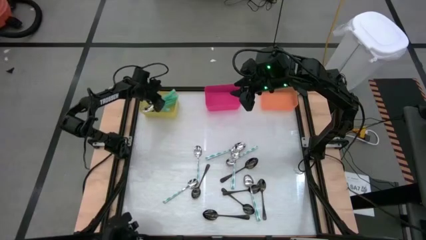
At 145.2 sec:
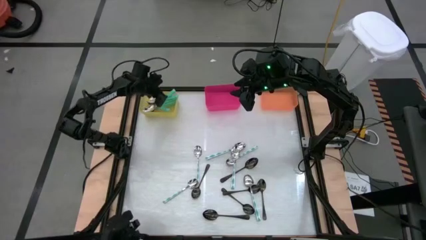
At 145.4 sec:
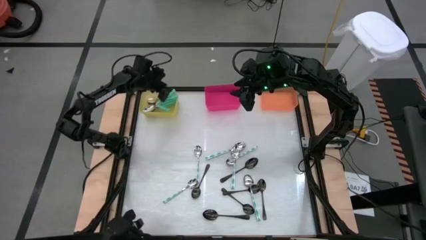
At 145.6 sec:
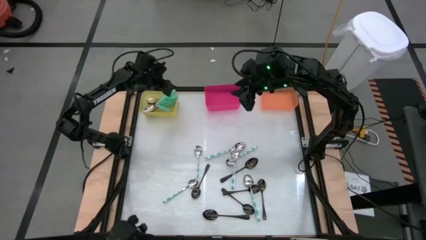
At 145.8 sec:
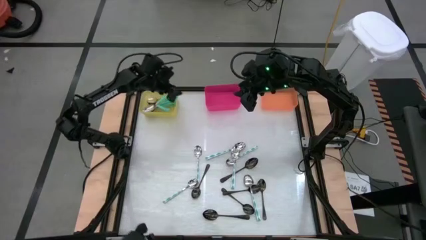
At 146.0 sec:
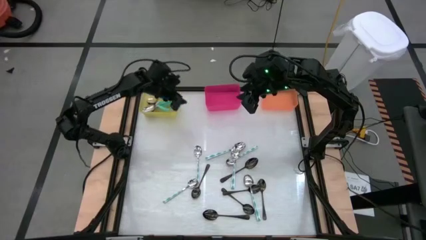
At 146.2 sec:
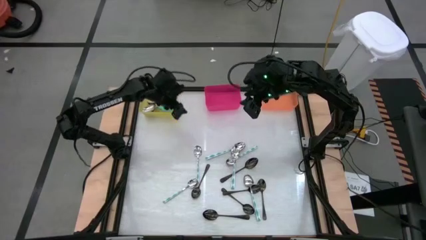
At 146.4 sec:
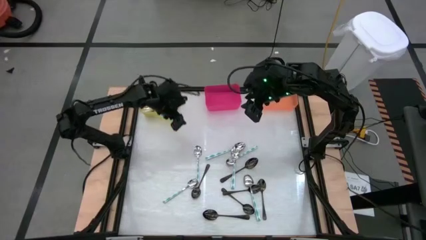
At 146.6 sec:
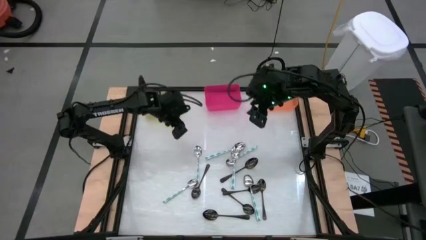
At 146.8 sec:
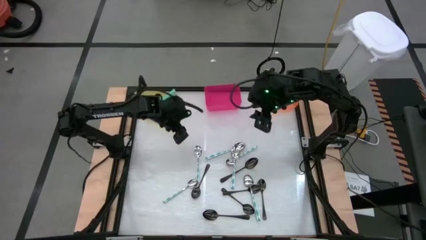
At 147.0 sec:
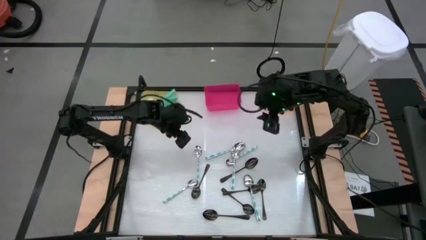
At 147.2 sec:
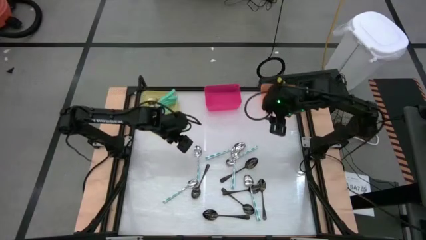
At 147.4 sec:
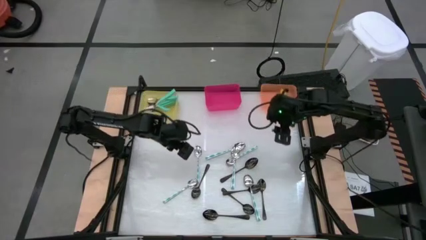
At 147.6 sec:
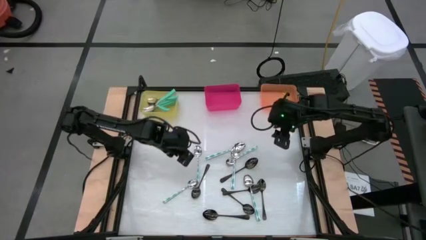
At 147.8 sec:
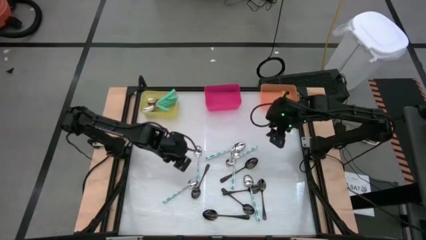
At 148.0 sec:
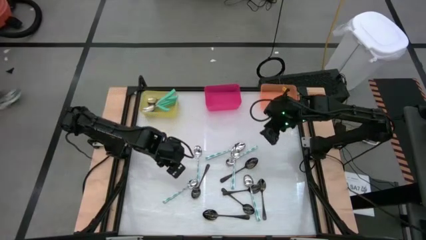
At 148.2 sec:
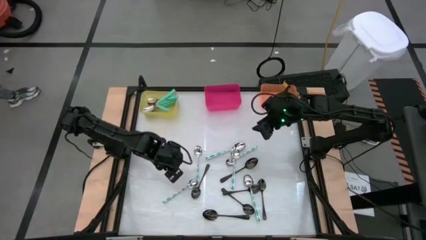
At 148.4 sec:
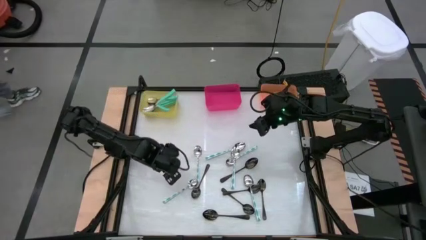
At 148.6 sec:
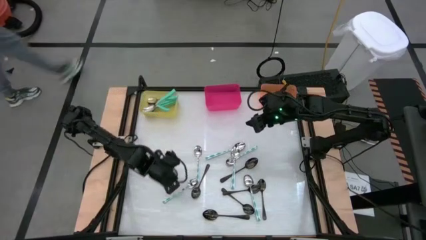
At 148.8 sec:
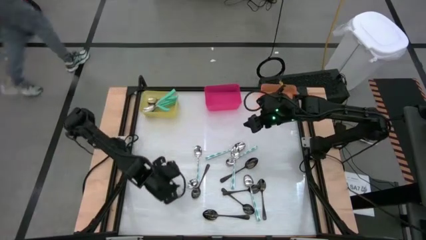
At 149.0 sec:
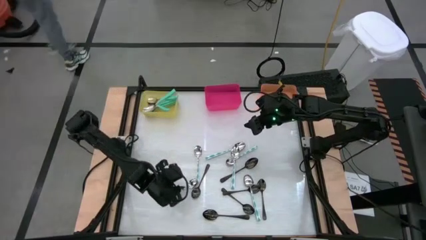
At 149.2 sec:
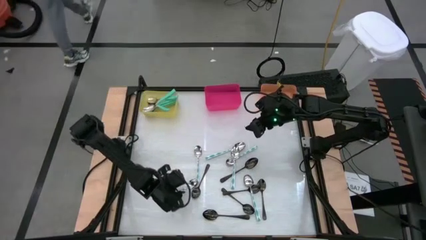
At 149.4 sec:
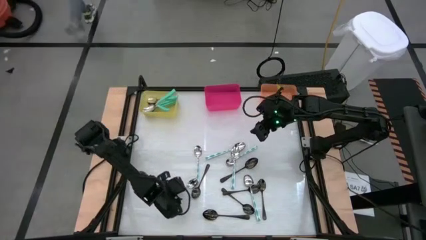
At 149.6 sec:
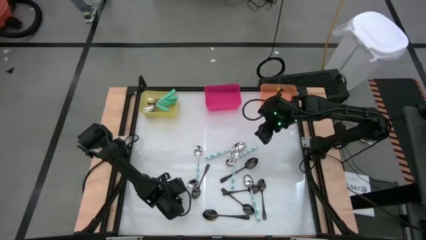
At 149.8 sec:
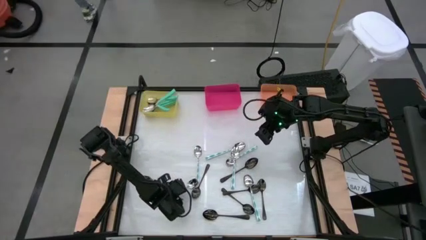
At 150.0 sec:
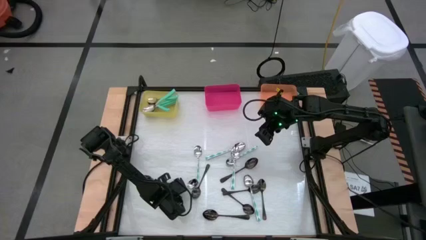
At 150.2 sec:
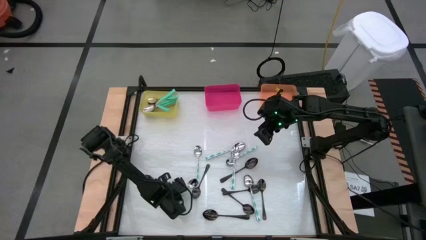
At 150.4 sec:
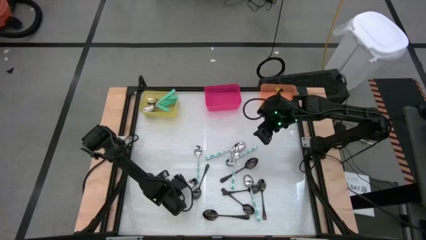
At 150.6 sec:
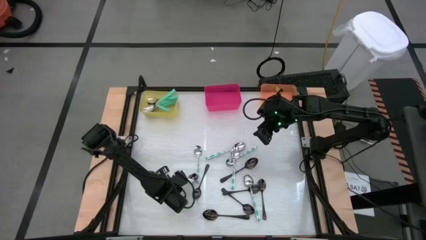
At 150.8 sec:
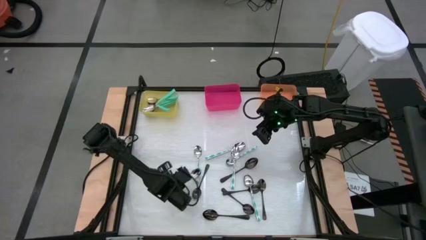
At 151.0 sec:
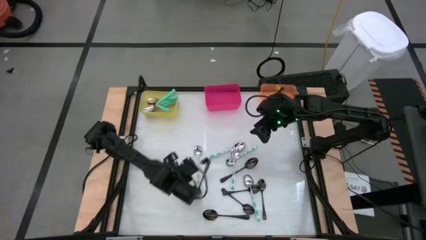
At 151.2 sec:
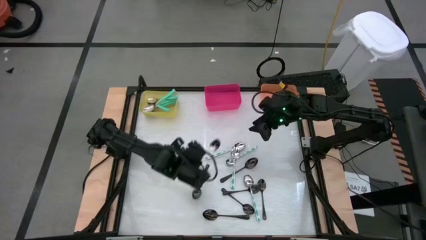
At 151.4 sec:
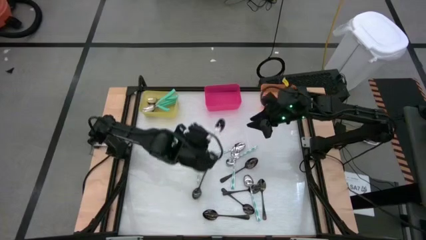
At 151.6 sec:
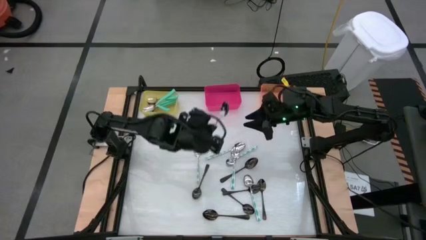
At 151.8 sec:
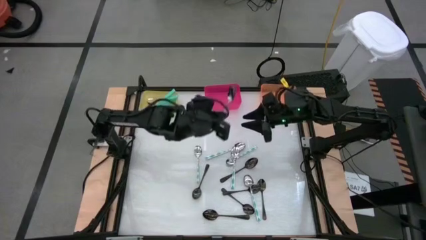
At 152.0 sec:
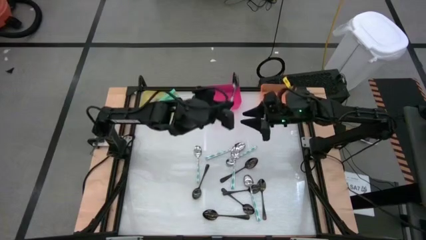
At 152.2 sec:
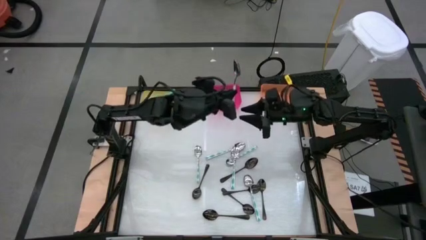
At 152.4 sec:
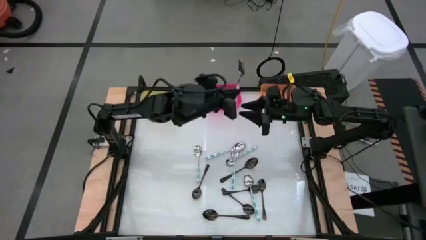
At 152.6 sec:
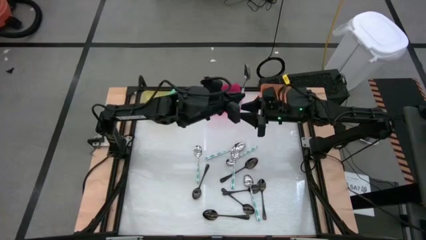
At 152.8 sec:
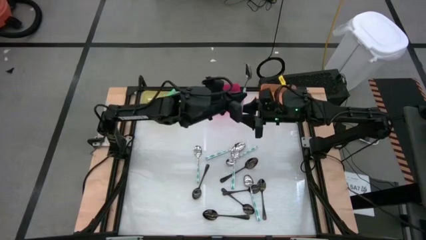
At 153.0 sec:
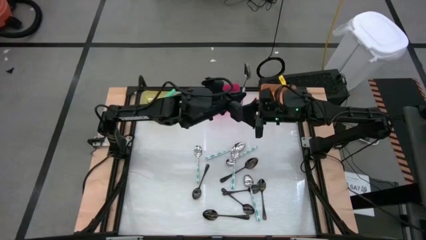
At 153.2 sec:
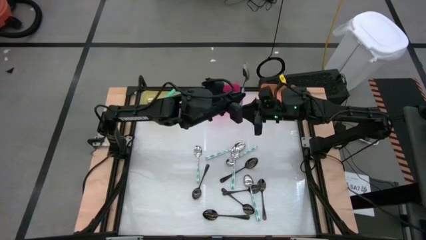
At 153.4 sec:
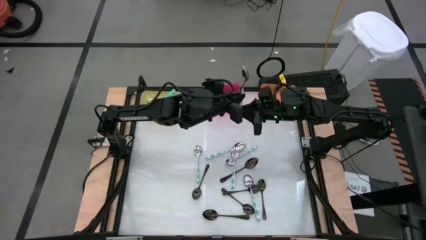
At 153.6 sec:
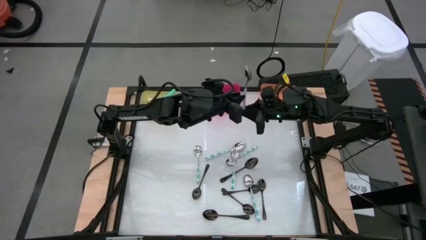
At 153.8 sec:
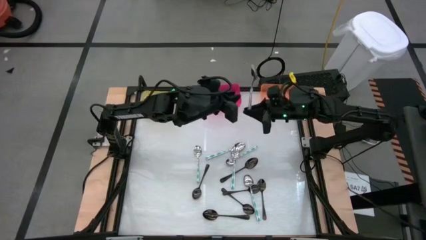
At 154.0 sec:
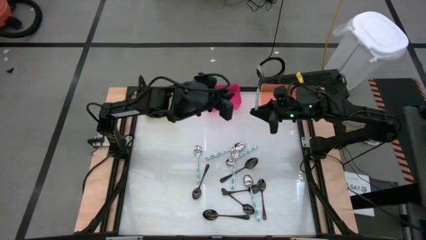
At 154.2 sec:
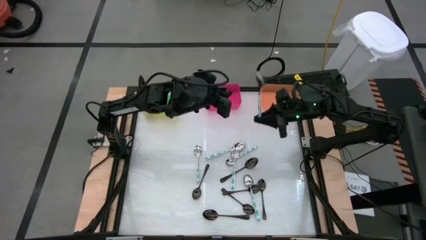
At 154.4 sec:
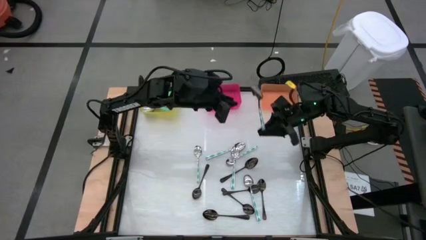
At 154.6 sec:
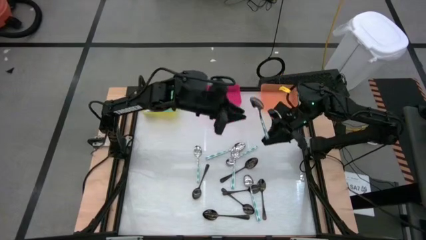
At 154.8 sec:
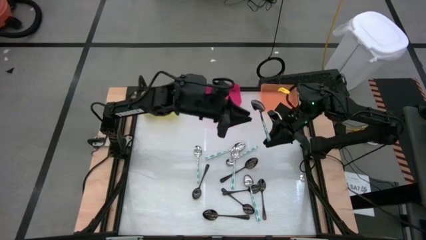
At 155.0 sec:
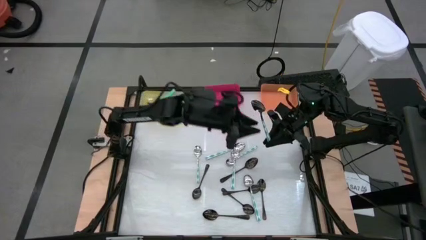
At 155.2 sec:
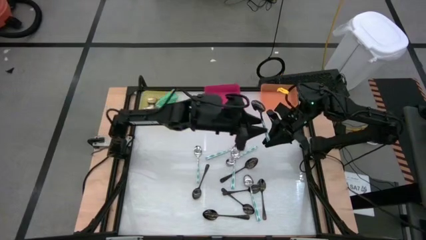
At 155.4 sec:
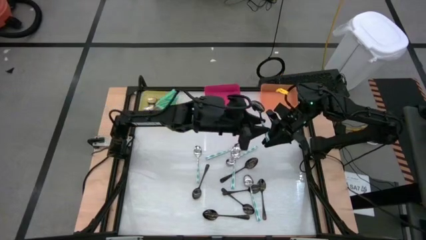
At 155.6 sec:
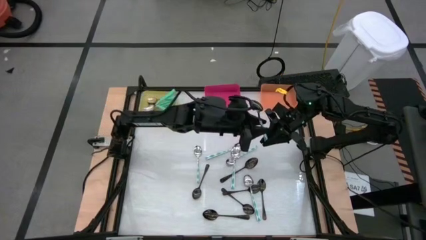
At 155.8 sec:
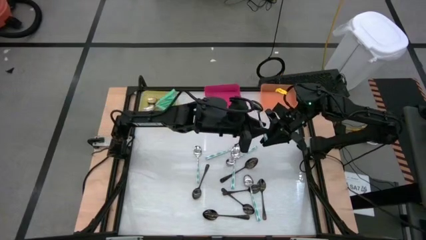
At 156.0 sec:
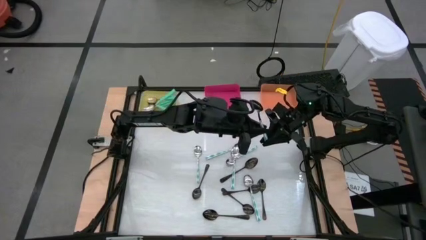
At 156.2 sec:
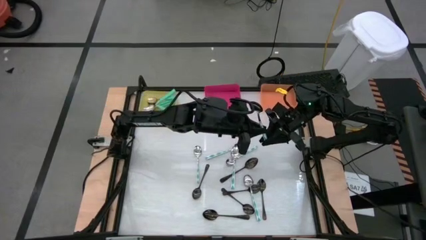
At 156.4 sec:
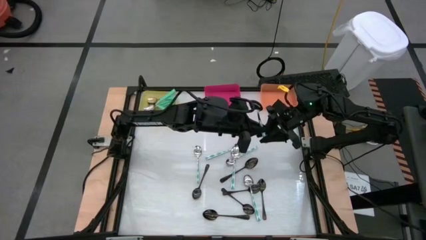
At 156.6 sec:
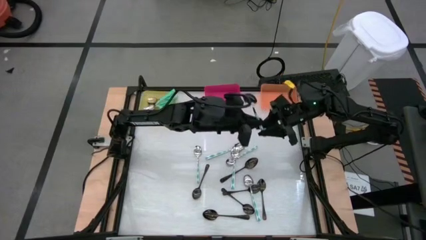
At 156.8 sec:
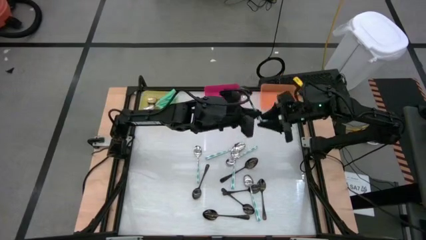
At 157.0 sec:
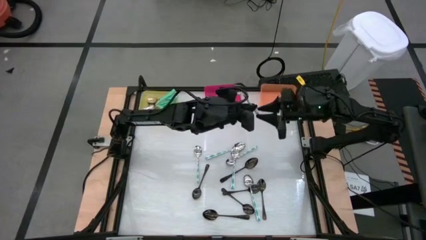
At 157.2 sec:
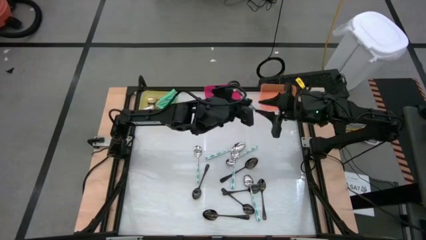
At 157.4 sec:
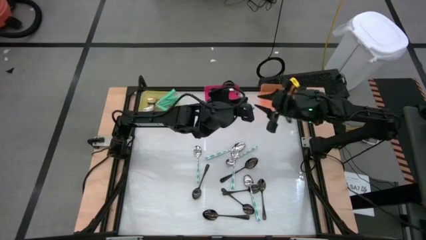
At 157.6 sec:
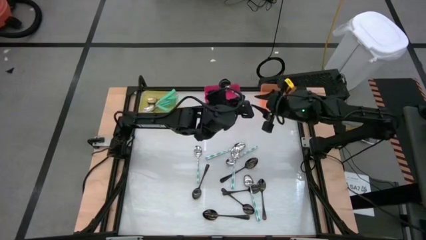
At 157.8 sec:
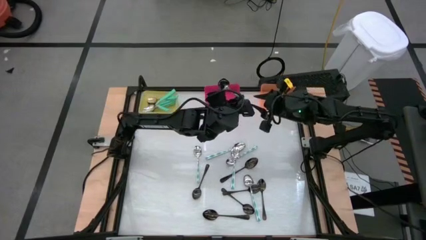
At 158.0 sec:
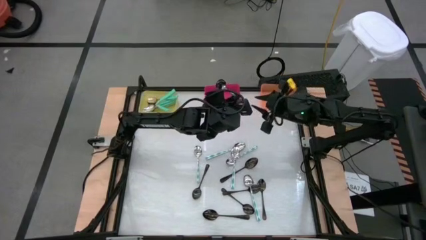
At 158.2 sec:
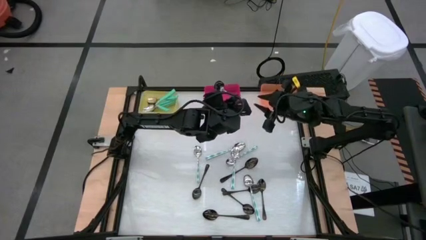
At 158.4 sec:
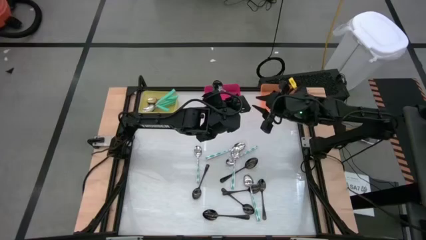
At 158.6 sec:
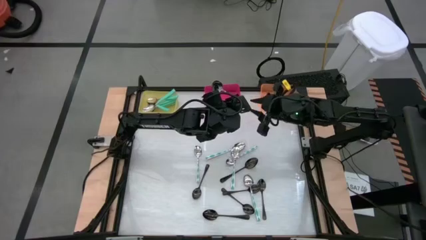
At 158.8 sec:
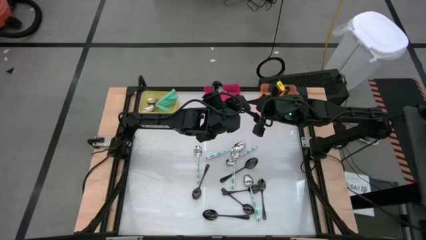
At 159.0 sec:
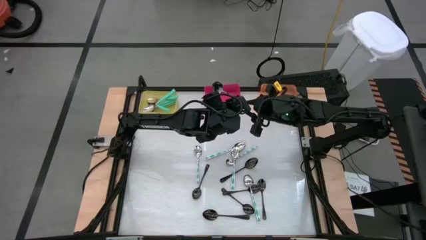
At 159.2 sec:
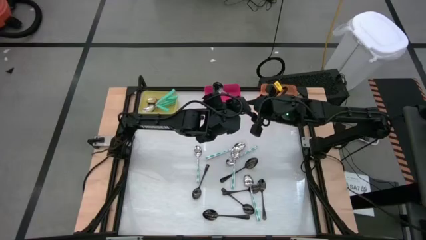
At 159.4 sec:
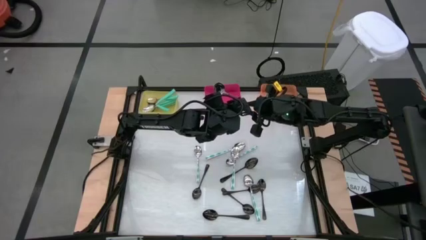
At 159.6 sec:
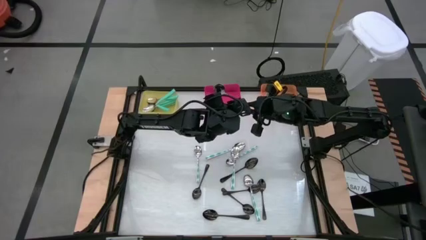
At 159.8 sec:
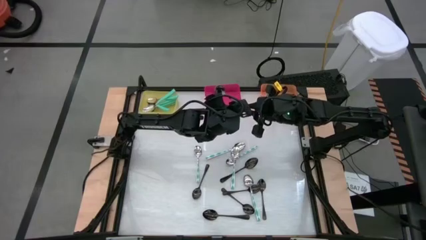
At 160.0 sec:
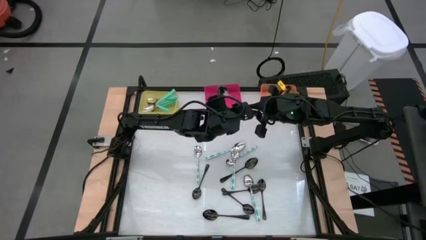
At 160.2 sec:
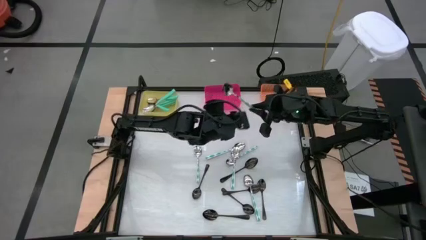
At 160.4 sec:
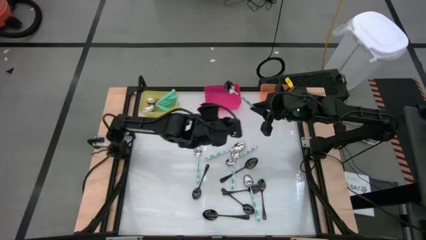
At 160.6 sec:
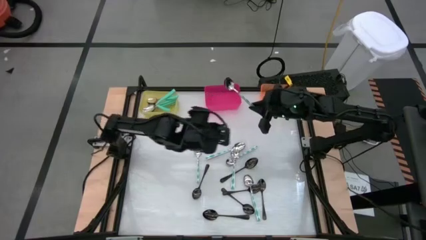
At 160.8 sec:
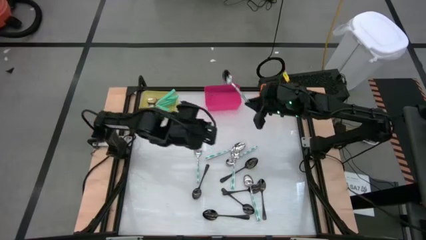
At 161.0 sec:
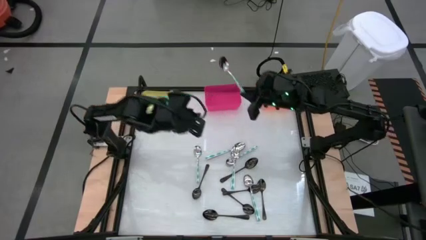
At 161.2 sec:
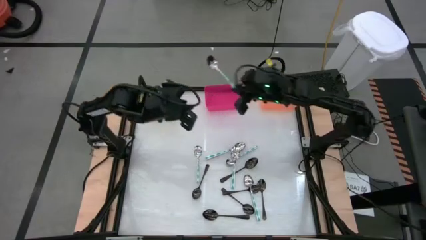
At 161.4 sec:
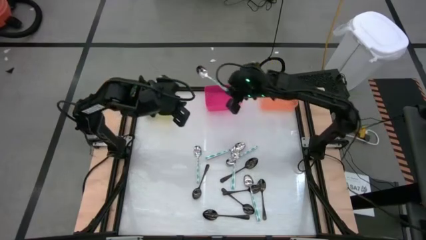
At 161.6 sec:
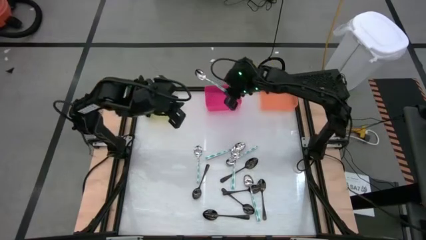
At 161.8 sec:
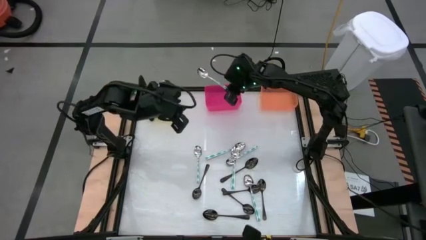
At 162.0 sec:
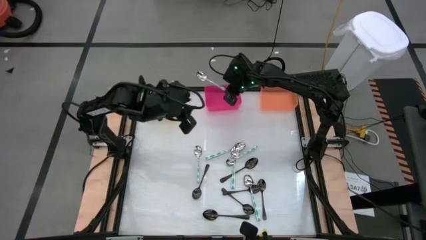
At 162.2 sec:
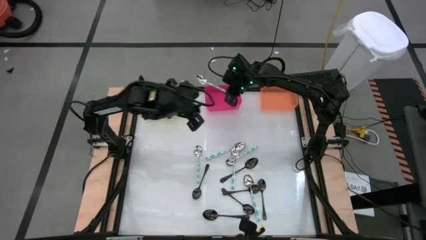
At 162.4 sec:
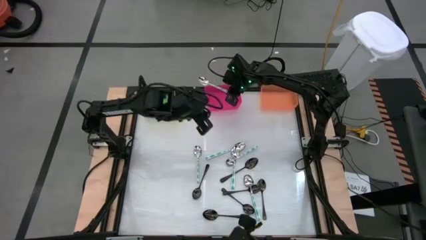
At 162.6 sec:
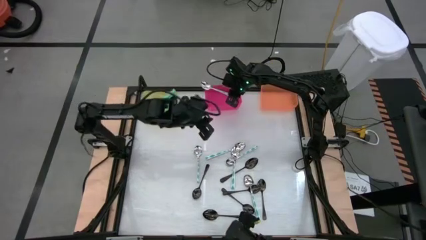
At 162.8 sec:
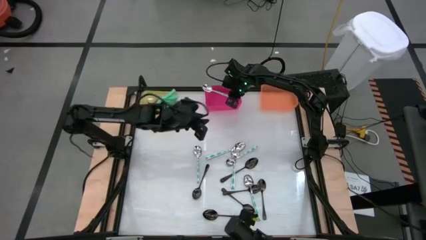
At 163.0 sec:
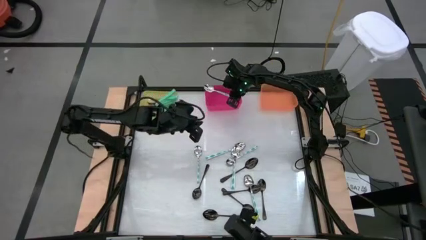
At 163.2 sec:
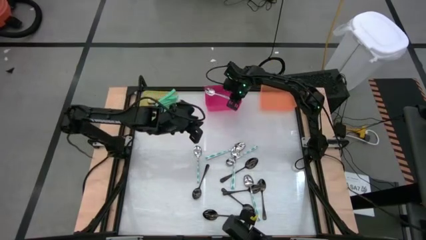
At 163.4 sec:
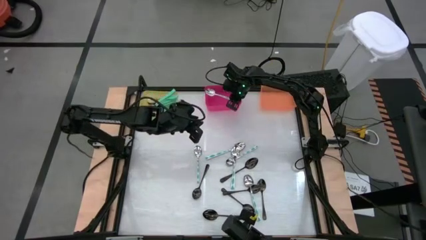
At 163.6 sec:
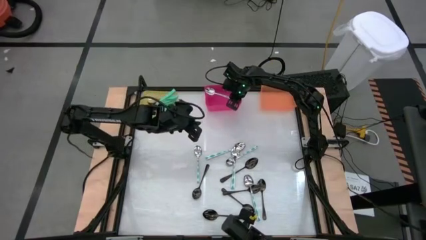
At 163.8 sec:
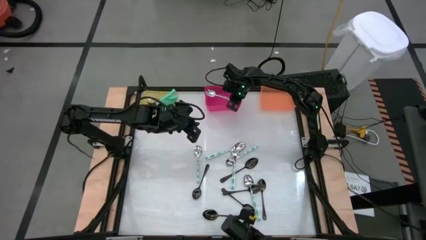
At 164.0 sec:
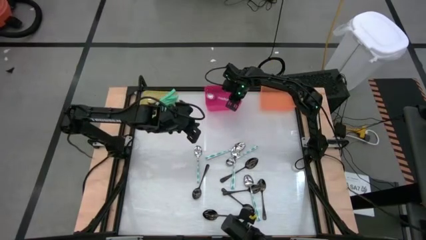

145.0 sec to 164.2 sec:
Task: Sort silverware by color (type)
Put the white patterned spoon into the pink bin
